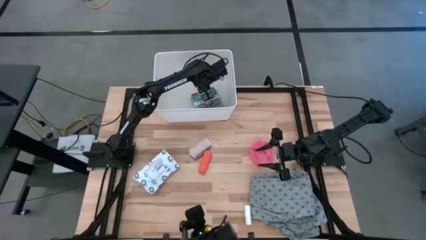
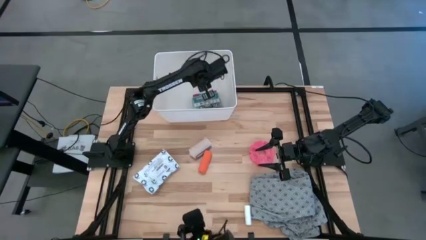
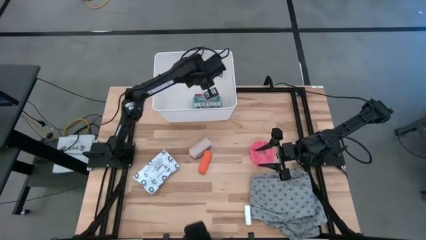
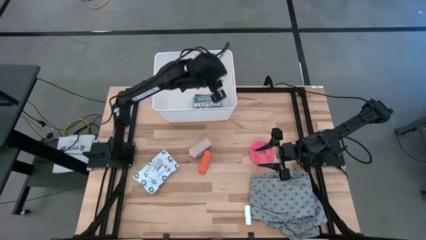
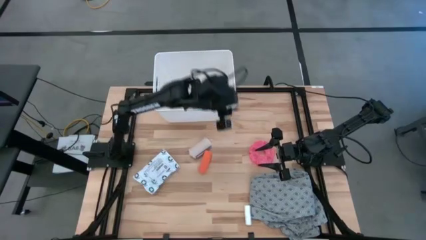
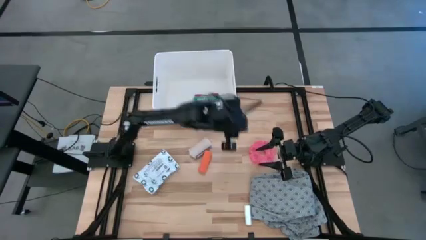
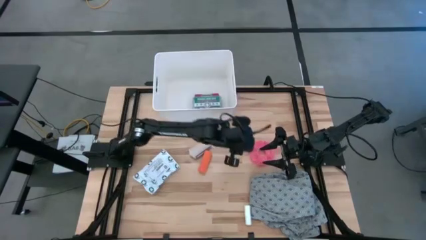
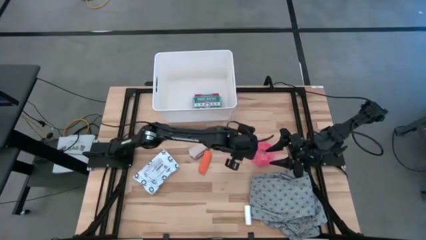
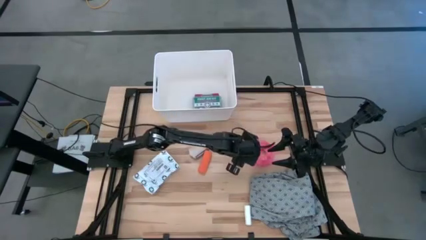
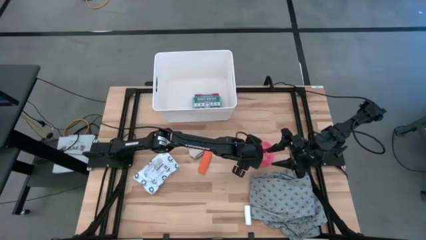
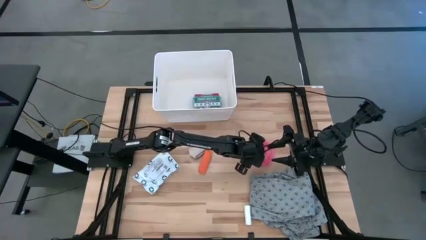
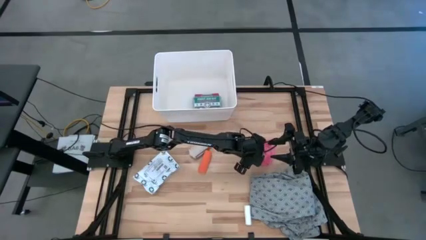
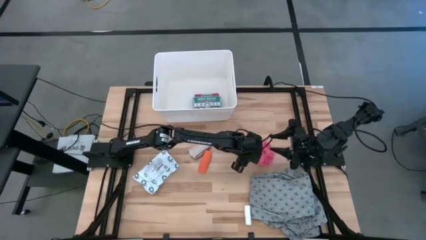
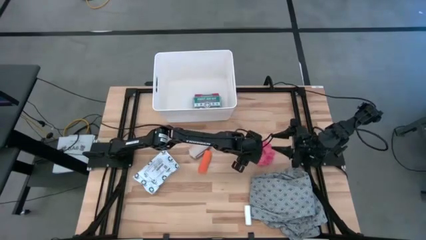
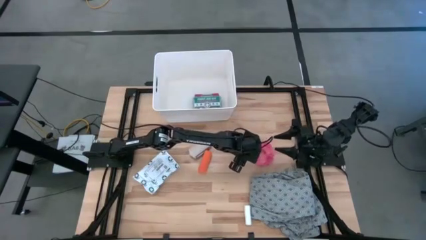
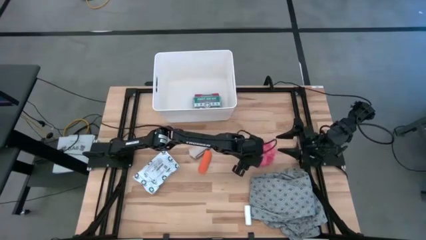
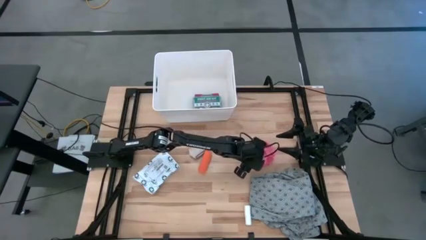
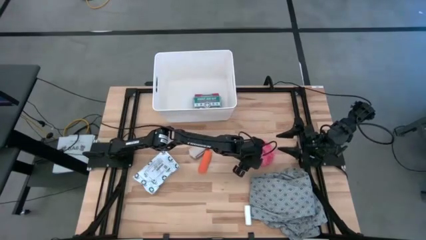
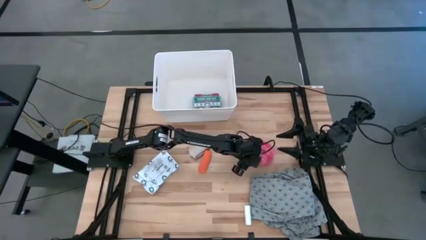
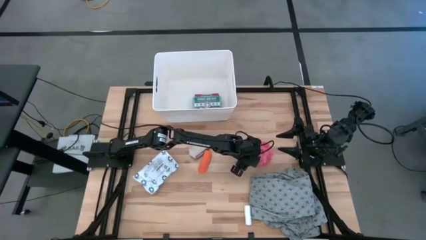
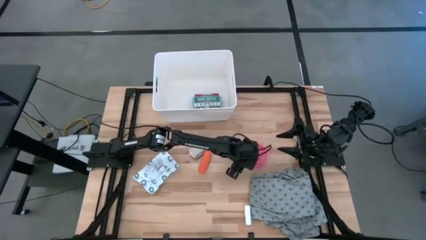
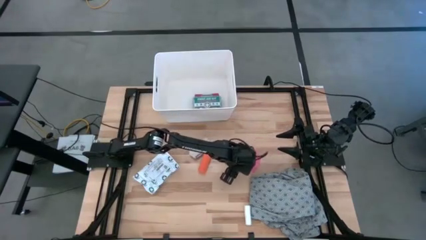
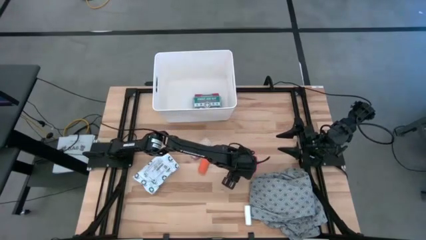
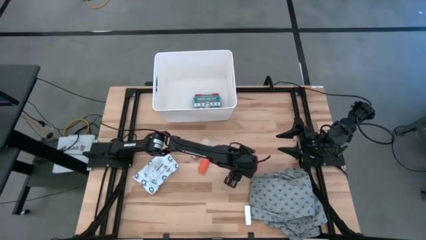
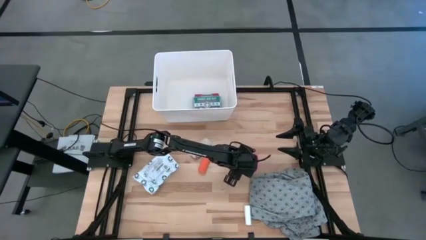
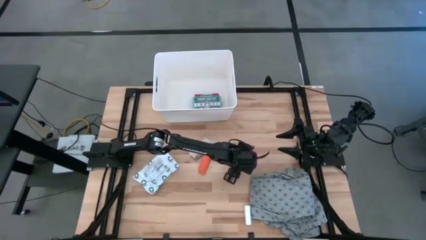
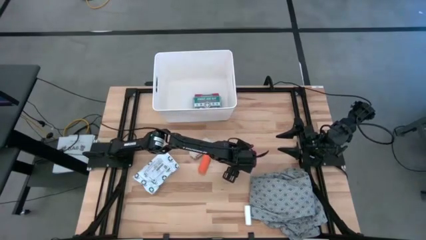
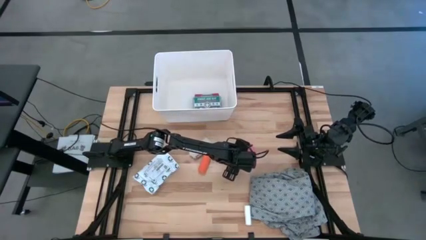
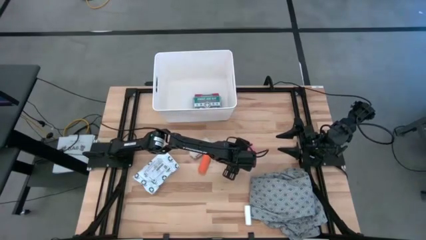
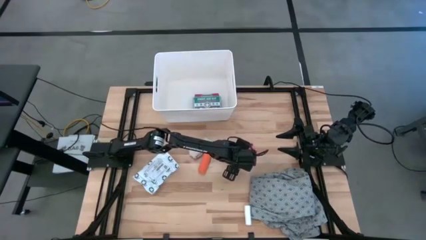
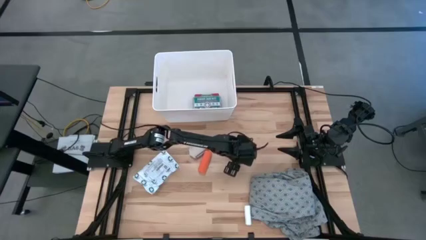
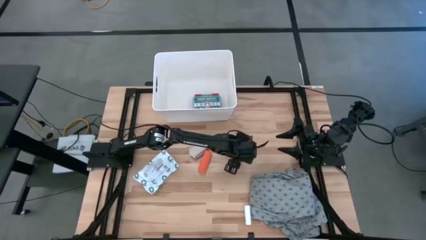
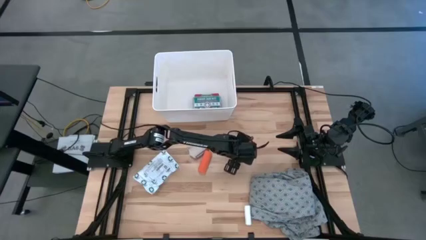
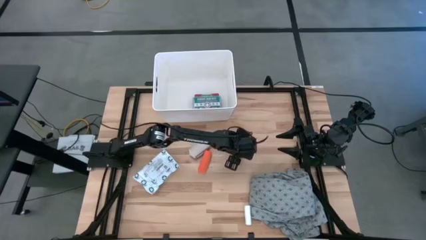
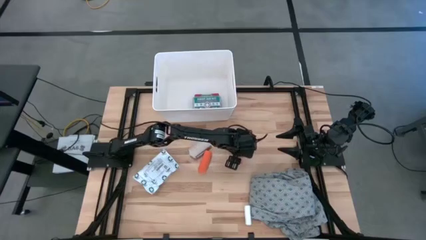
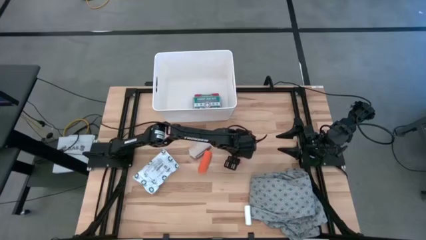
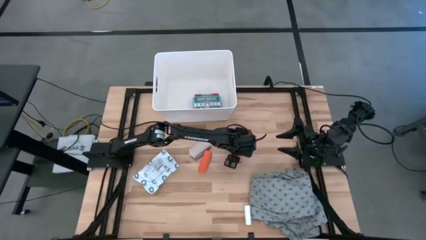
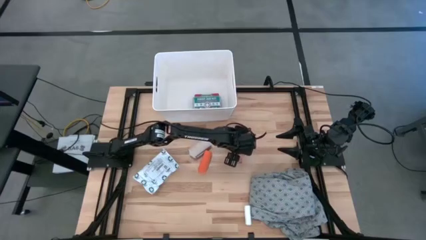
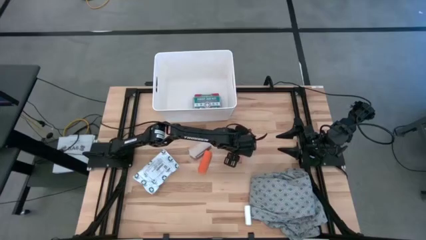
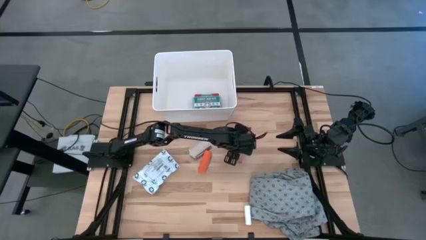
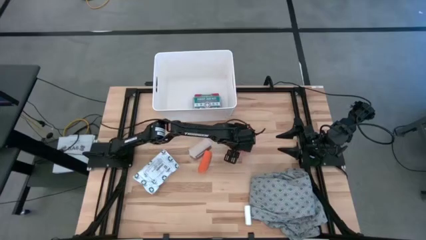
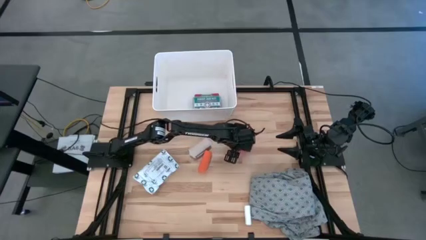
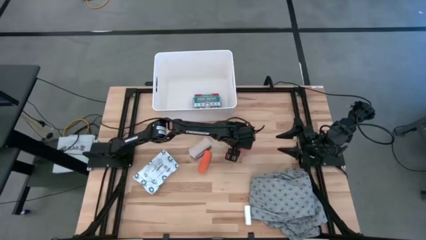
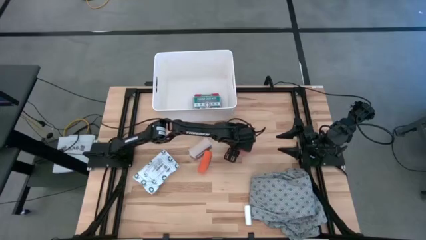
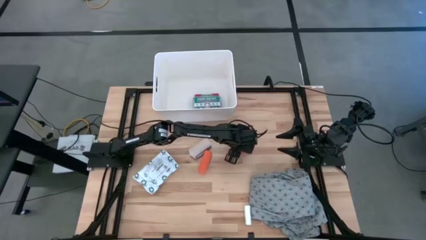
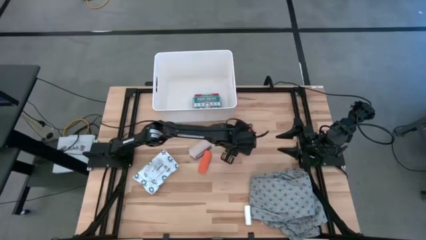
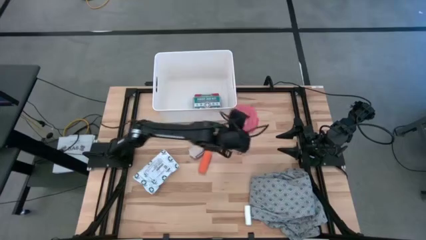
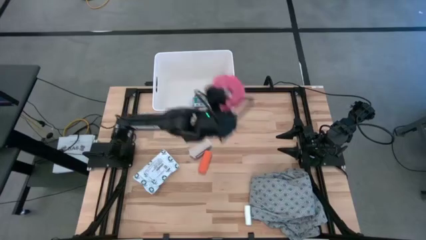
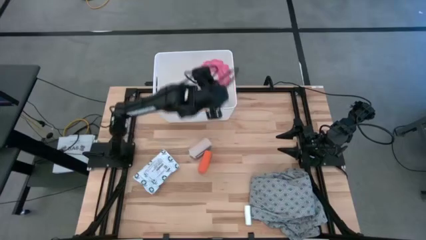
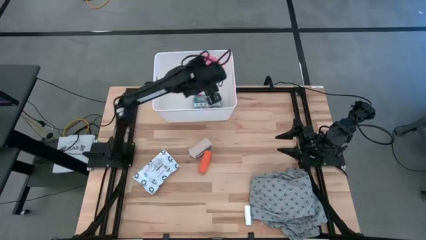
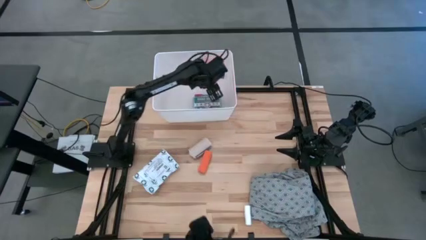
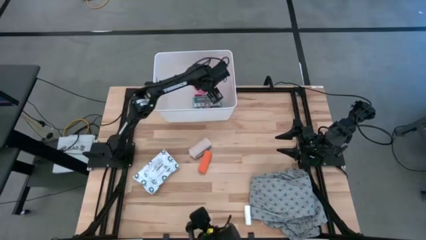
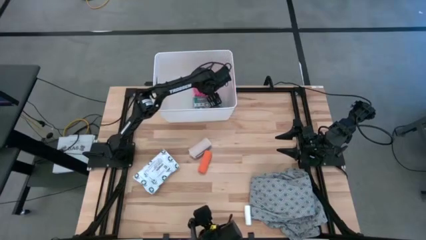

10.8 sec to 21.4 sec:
Task: Pick & place medical supplies in basket/bin
Put the pink medicine organizer into the white bin

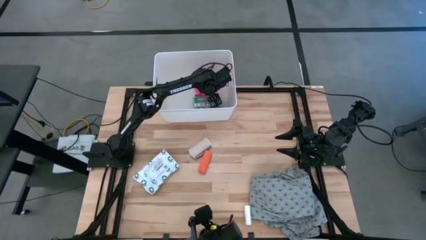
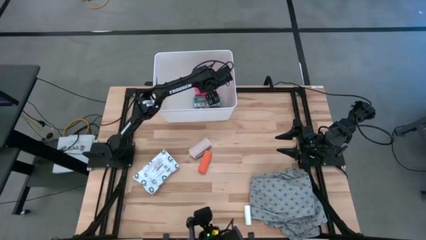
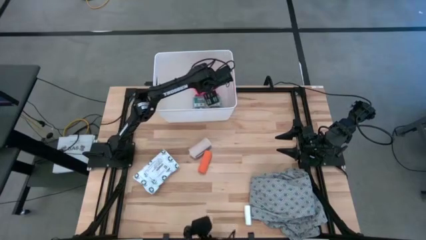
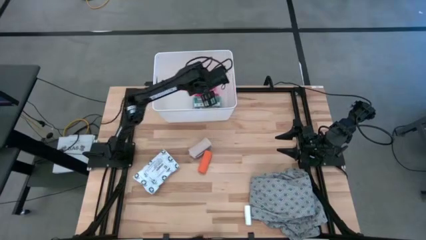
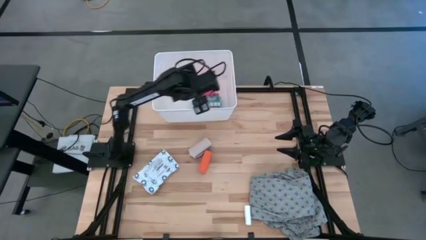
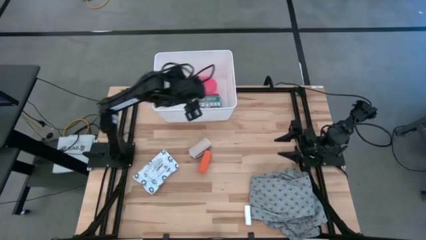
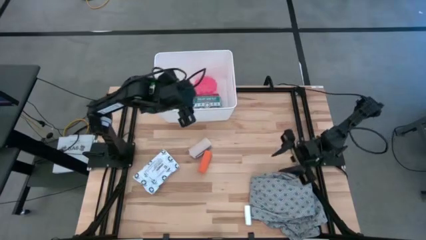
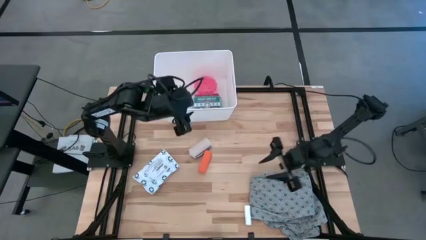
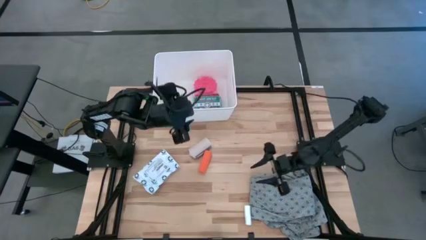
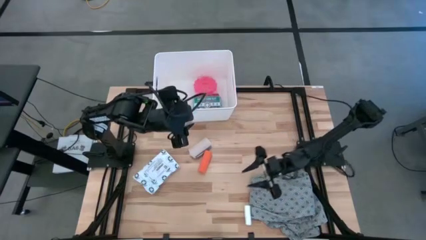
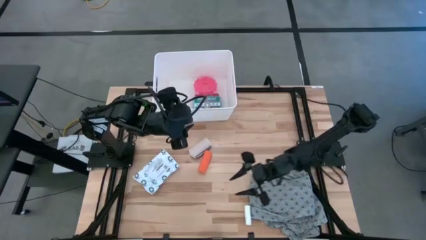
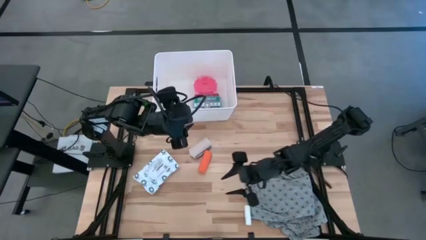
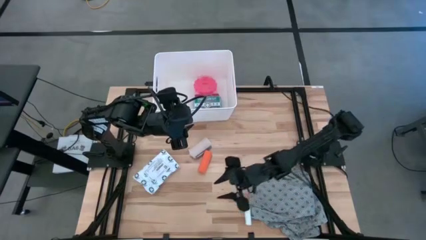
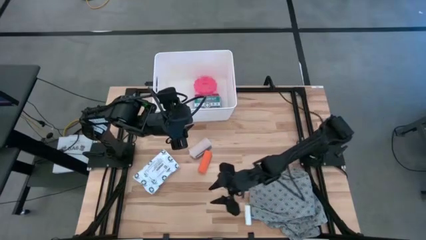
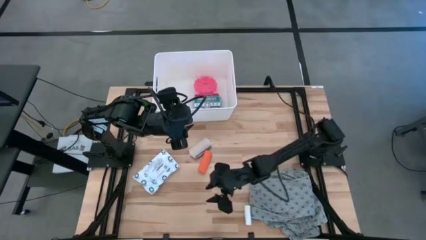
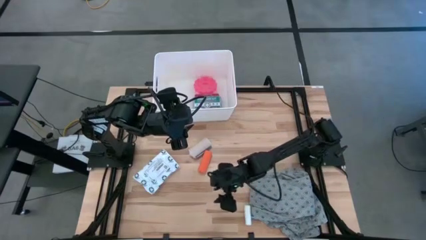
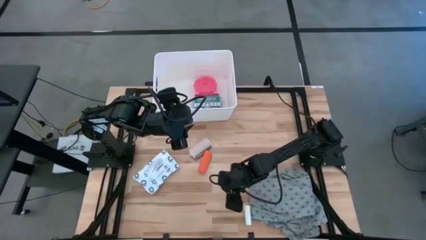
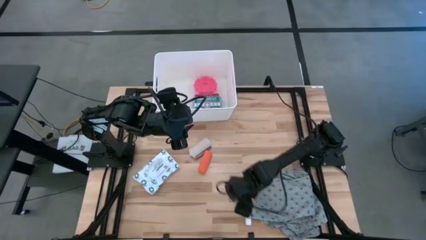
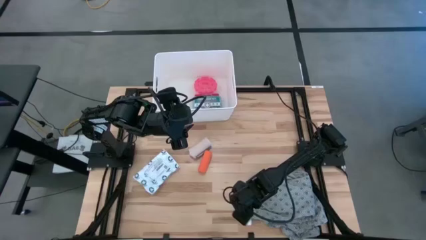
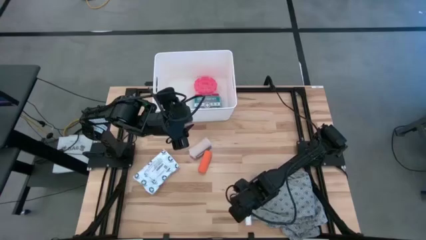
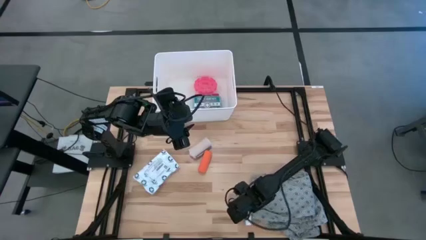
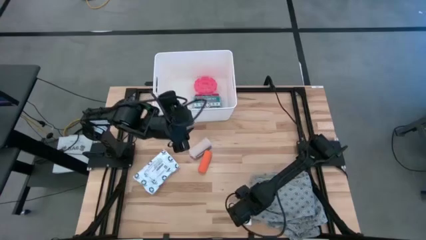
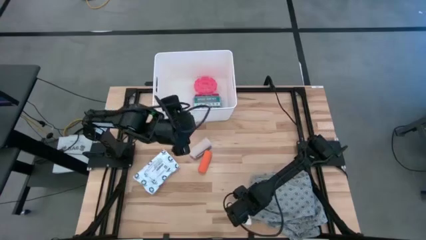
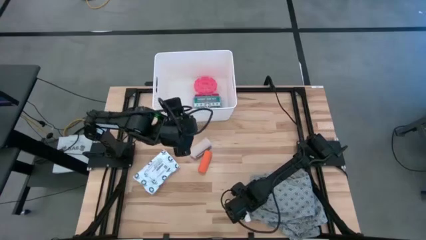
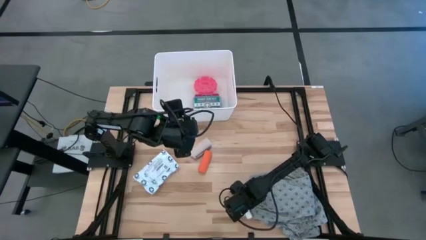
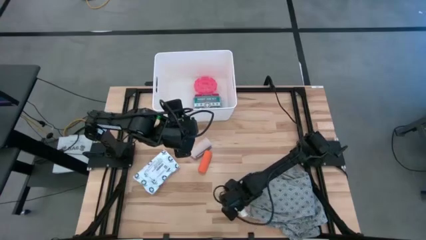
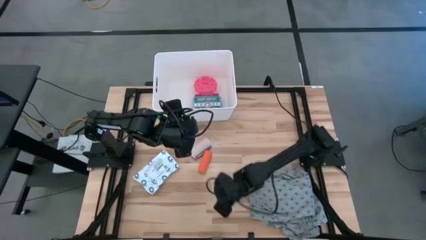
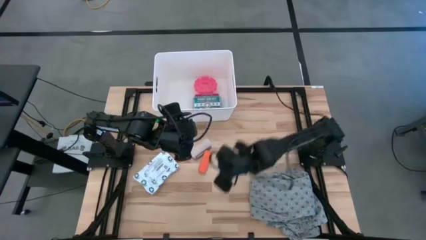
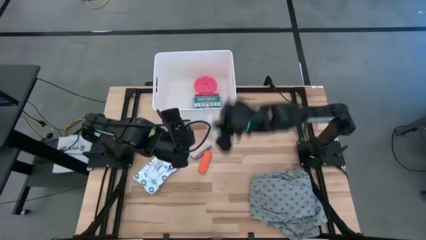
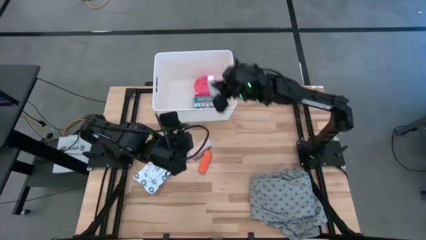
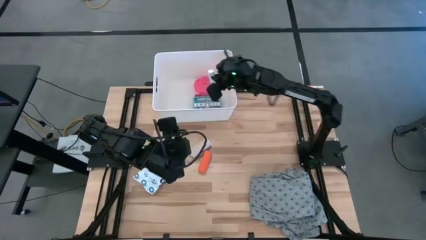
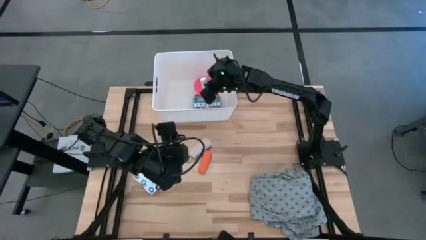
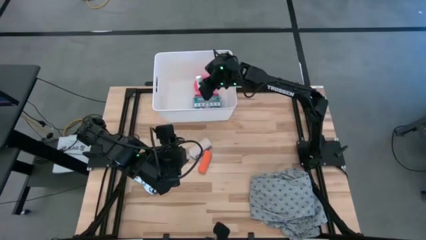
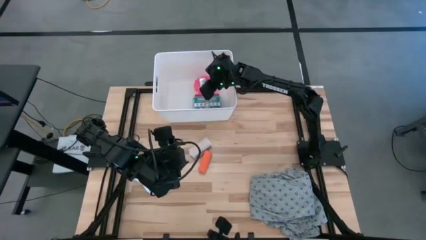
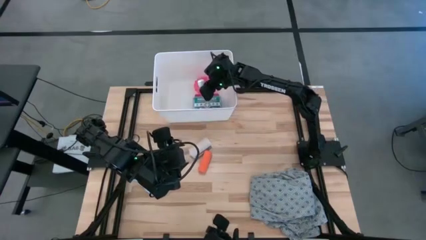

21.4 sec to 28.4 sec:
Put the white rolled gauze into the white bin
